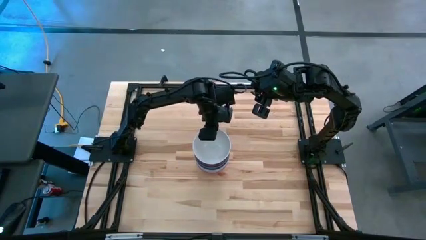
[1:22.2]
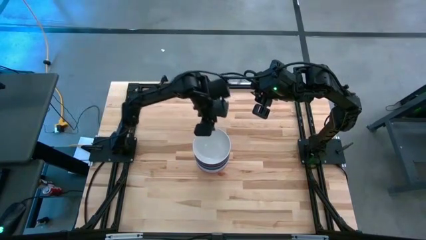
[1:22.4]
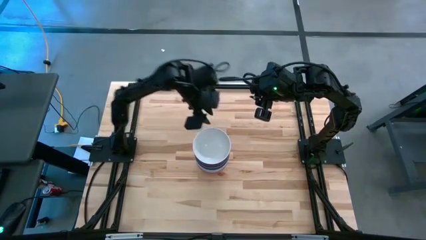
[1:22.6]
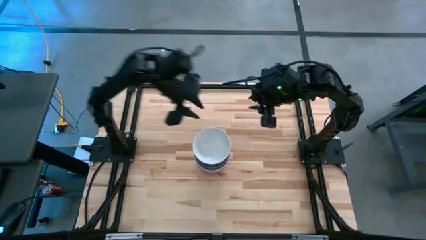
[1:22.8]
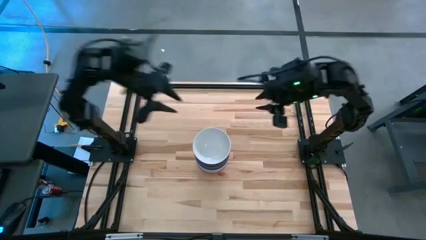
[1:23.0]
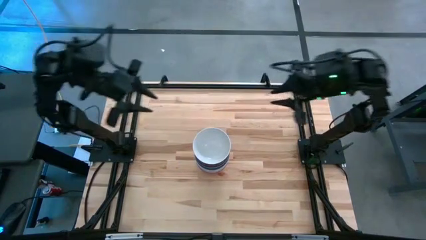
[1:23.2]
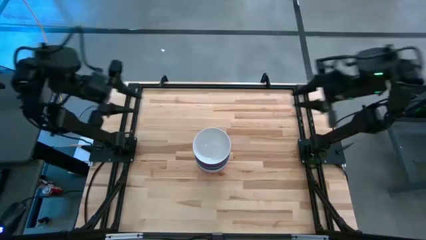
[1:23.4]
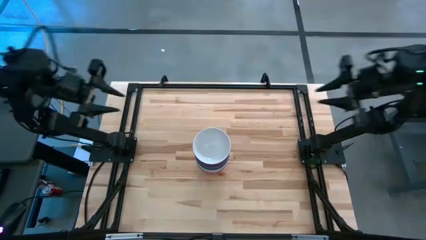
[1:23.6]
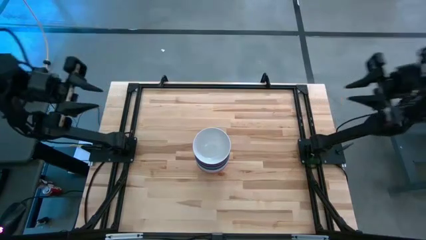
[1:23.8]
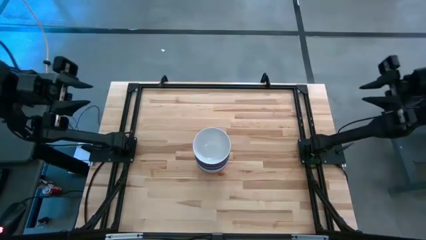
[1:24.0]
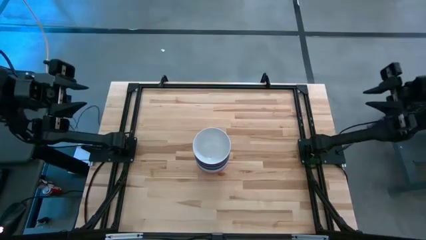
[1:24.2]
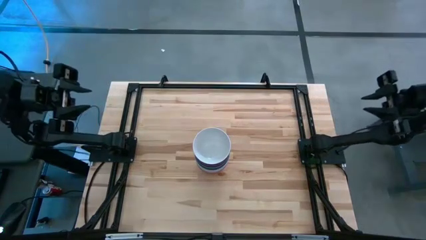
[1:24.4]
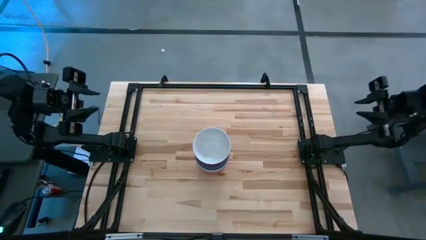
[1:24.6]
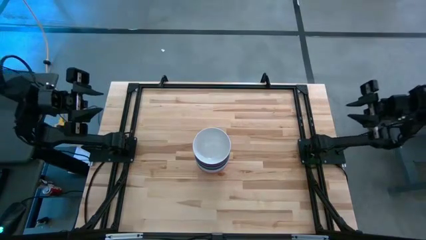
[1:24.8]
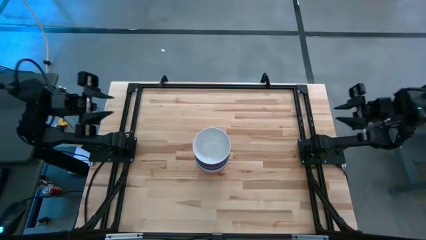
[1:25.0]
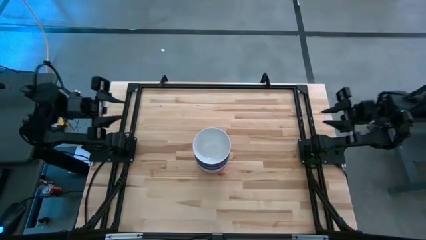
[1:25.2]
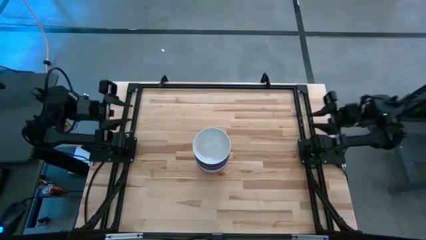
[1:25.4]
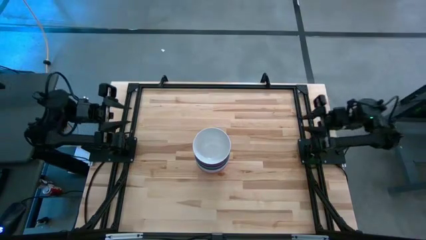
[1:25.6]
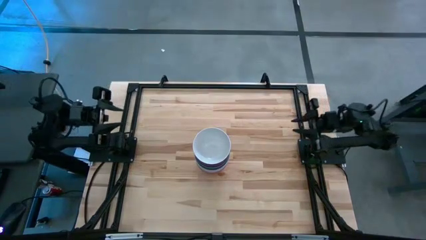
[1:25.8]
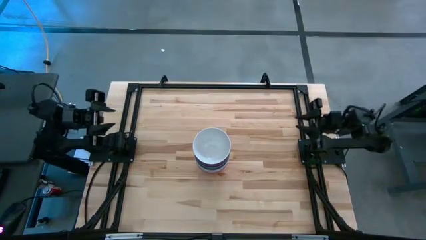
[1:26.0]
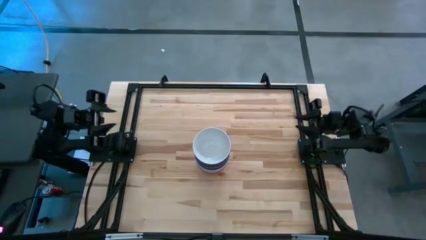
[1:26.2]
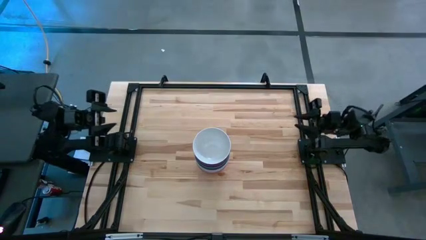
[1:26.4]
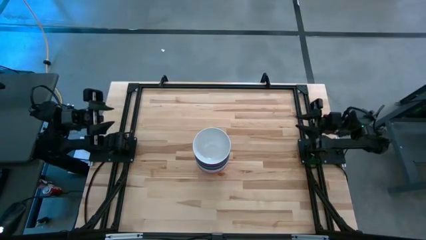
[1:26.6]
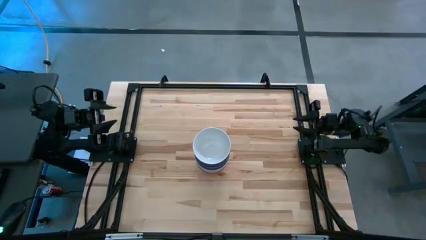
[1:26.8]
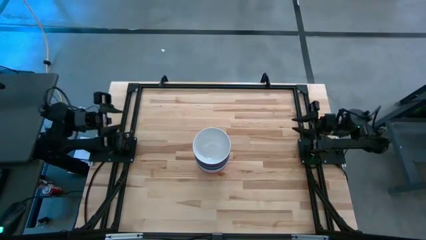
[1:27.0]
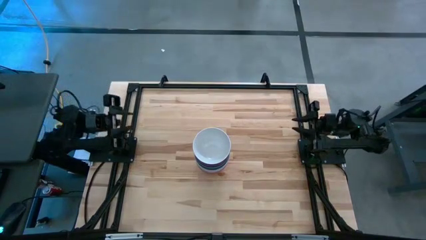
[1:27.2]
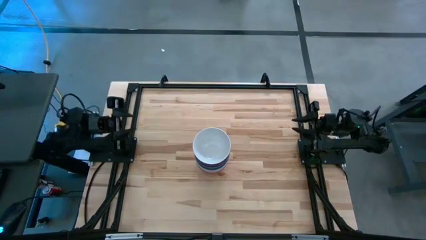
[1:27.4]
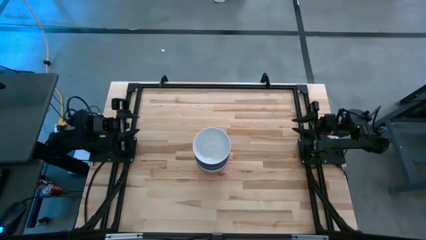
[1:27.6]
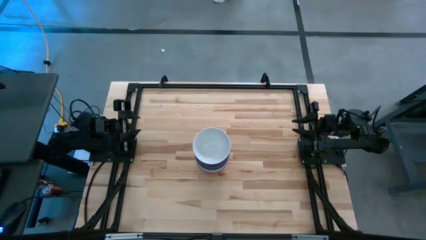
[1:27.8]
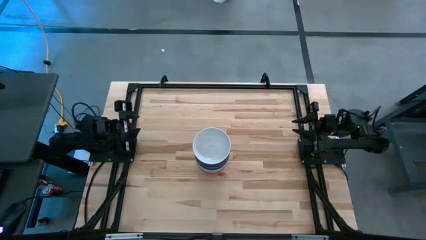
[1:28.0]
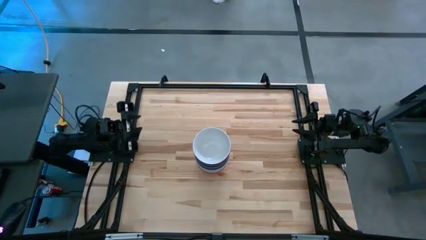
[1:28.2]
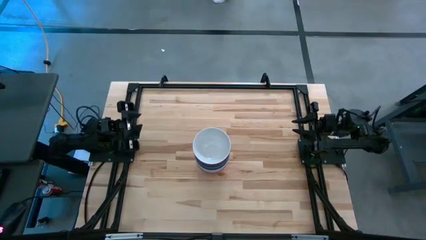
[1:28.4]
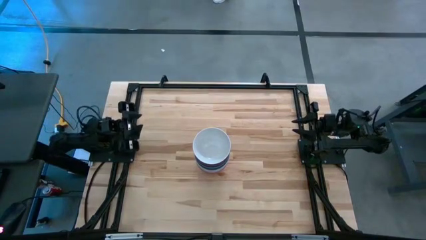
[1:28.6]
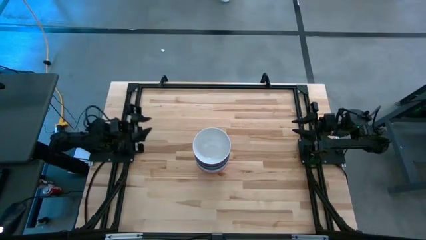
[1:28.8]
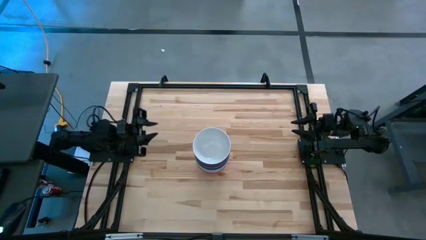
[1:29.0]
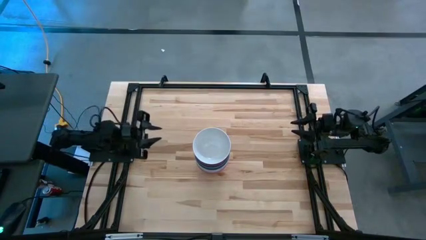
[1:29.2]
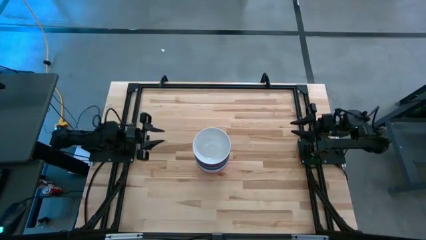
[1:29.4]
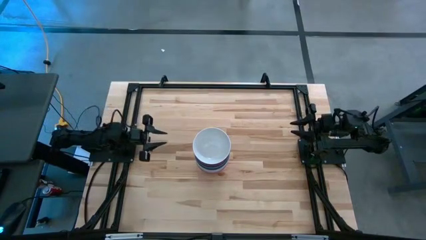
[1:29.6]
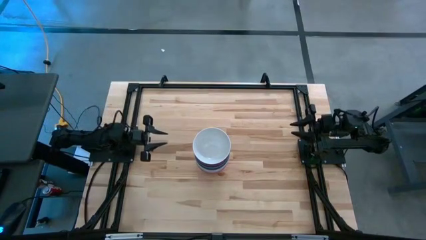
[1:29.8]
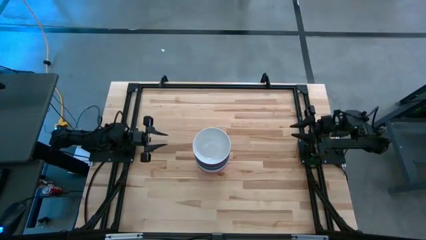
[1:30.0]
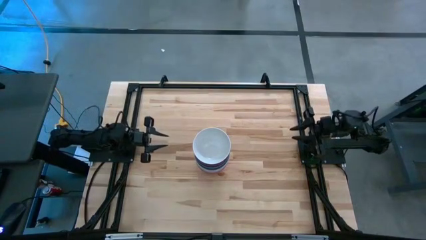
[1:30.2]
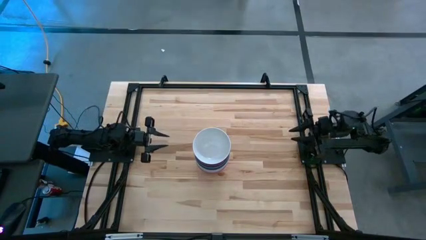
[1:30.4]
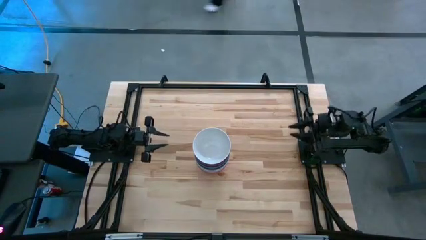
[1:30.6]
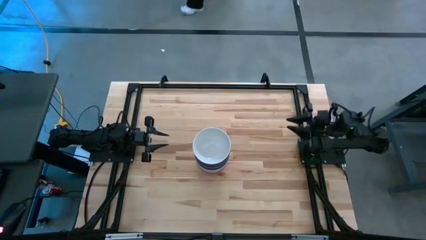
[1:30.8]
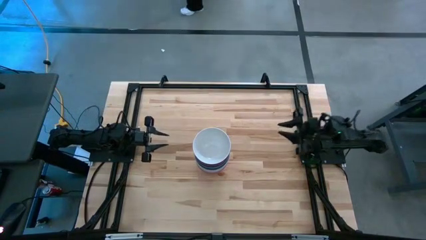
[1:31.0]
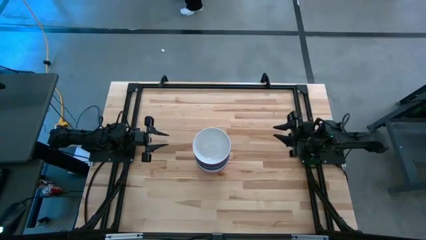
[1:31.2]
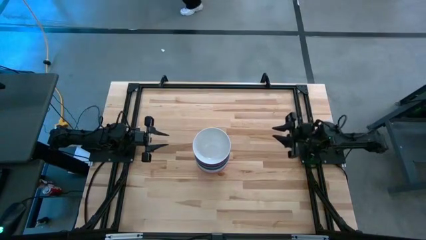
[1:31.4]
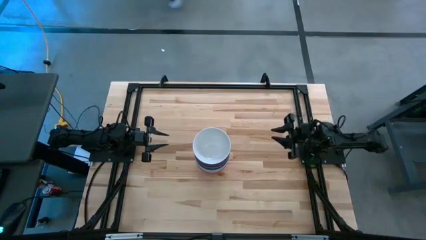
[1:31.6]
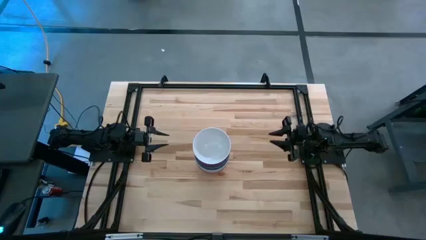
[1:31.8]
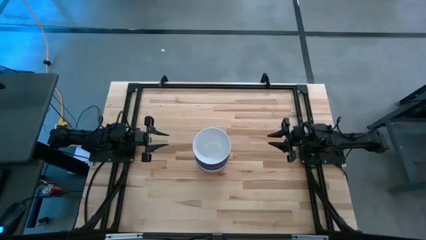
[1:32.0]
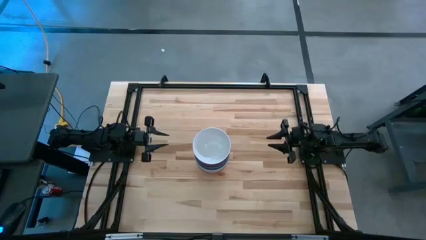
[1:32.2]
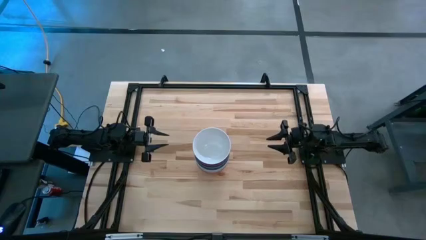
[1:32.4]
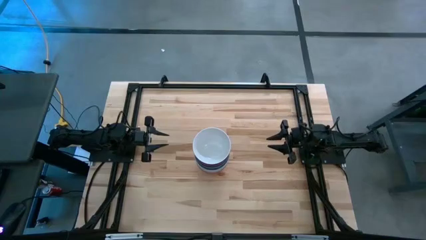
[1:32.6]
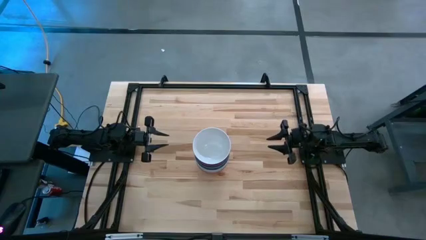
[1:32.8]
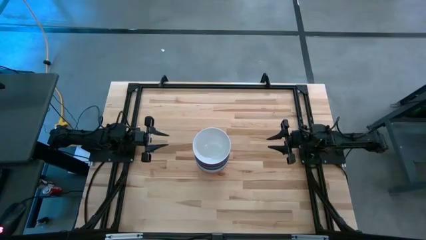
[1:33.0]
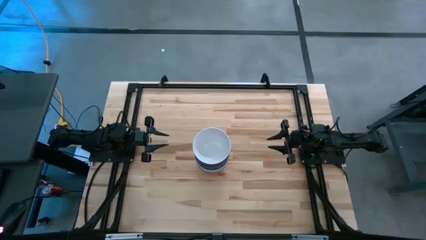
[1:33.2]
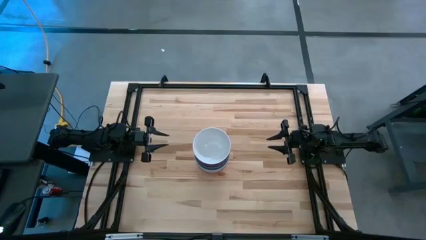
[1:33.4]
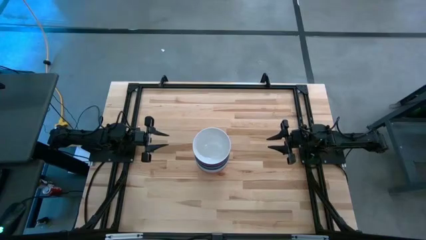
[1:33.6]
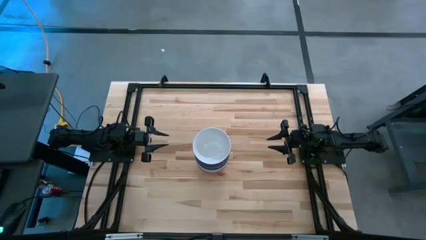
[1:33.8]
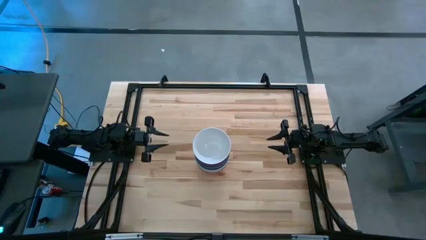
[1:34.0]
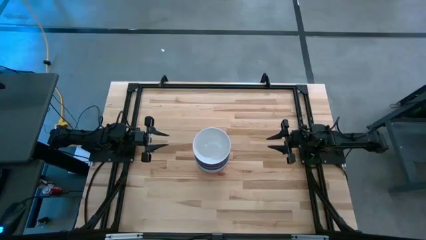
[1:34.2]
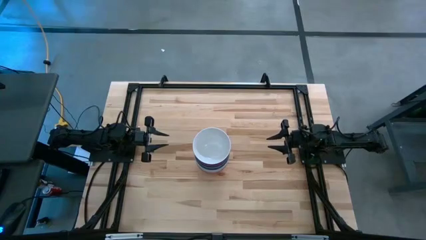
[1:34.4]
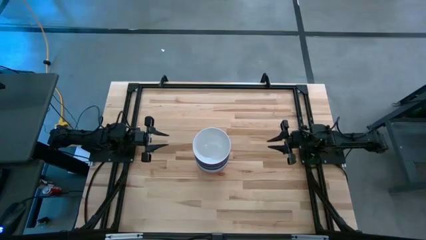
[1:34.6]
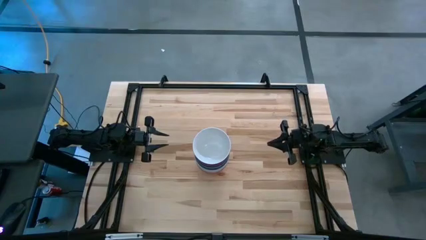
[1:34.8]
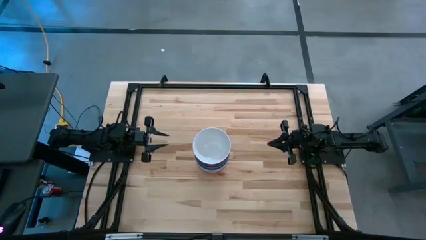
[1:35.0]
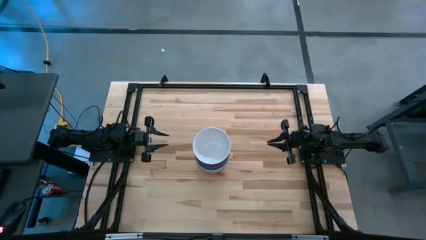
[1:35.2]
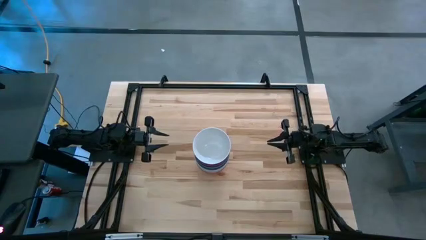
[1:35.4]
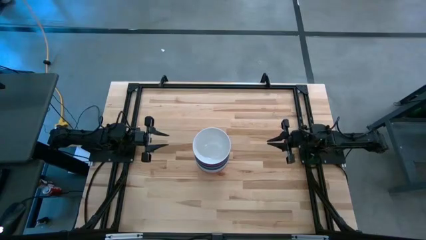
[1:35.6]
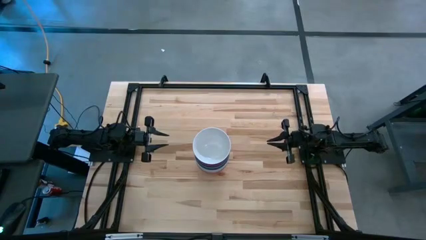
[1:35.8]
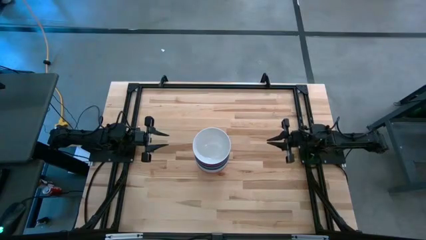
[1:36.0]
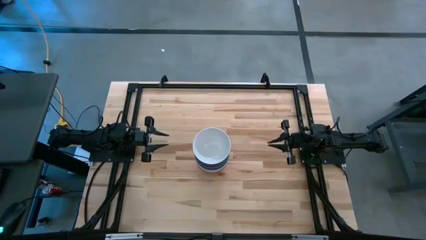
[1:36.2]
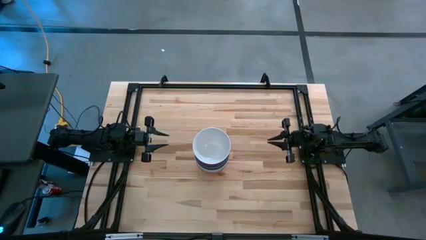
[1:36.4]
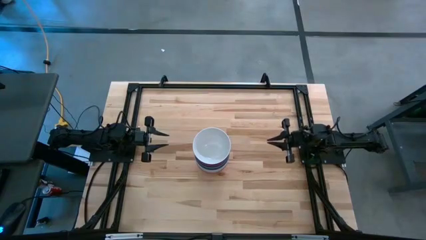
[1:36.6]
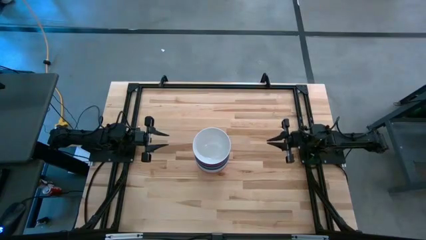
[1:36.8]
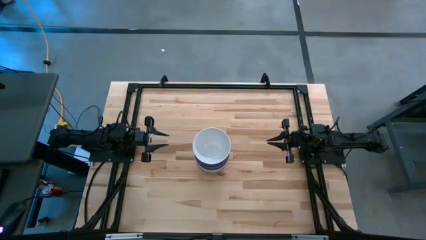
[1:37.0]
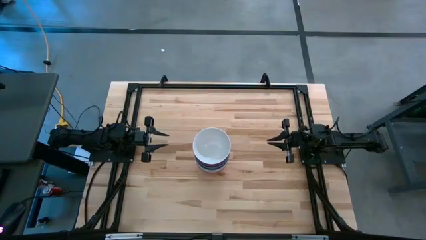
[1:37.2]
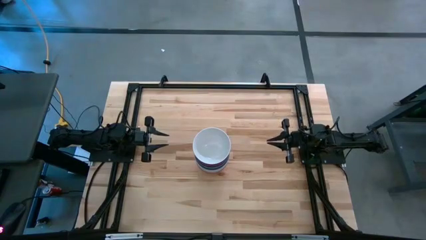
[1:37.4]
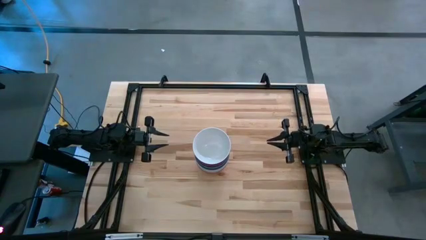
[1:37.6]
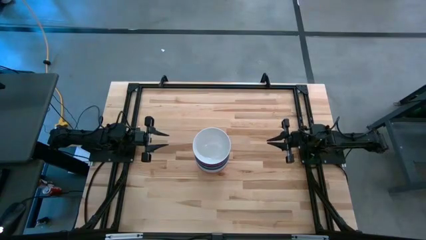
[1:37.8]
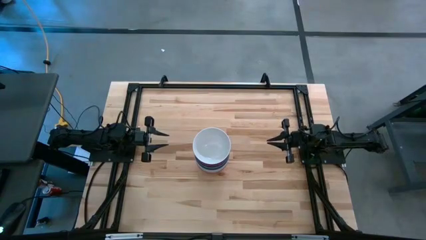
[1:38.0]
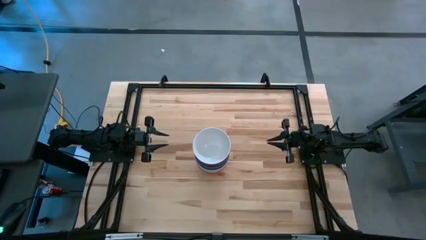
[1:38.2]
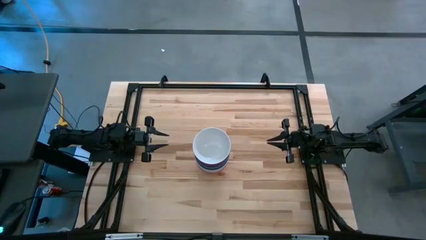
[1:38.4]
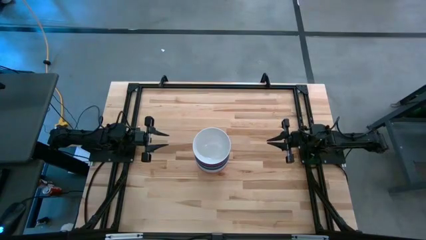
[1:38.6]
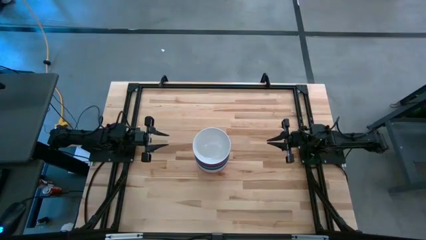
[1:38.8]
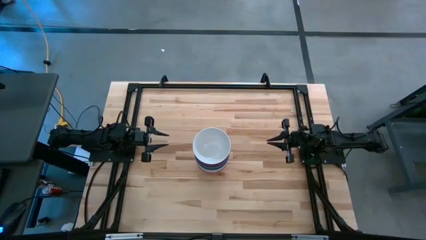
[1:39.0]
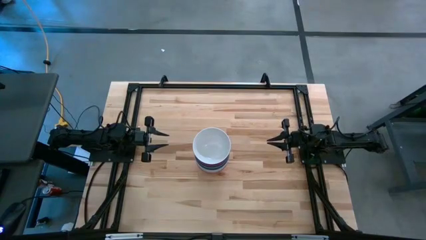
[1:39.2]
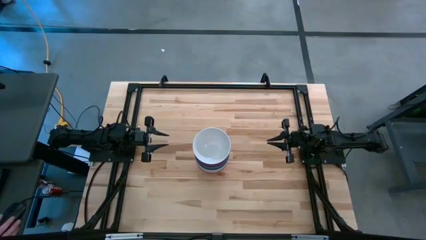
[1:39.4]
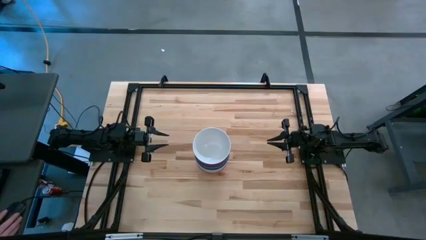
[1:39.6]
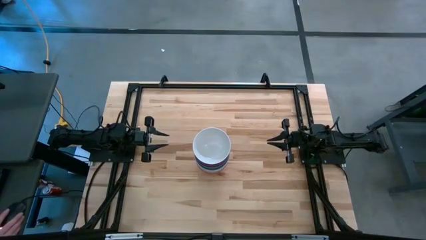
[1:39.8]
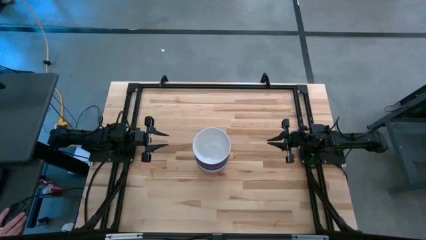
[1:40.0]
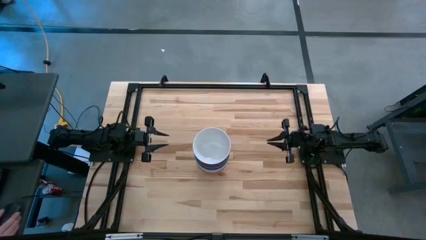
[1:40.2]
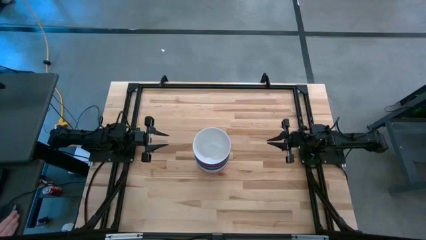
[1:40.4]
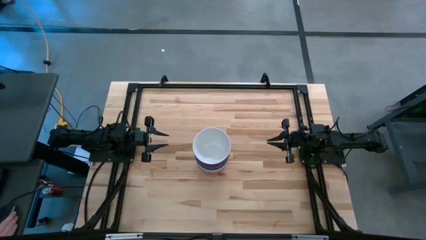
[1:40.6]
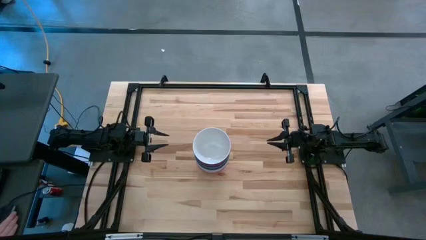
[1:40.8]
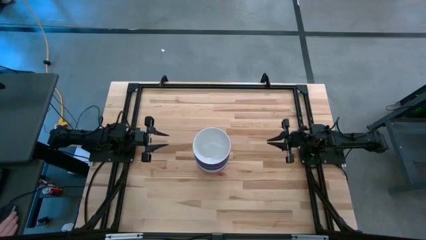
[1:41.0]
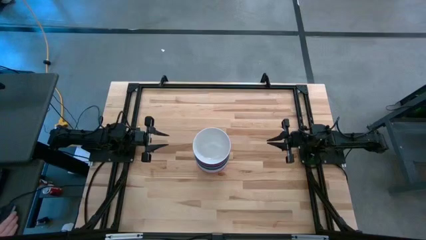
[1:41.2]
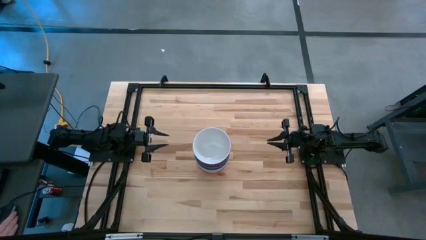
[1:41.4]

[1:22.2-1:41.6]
Task: Nest bowls inside each other
Return to home position
